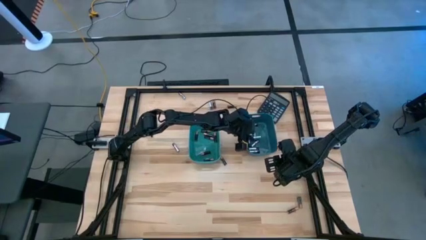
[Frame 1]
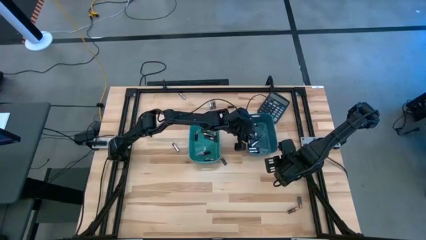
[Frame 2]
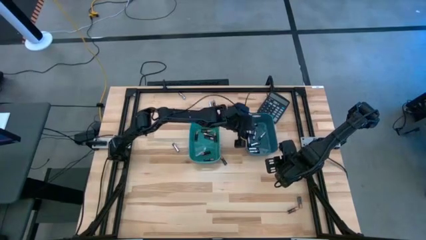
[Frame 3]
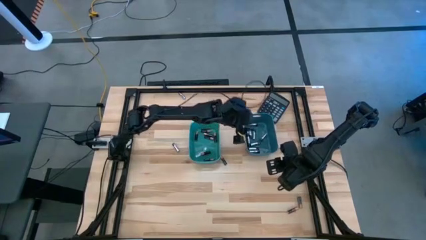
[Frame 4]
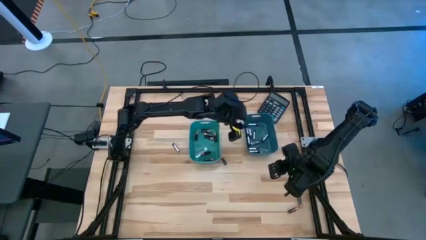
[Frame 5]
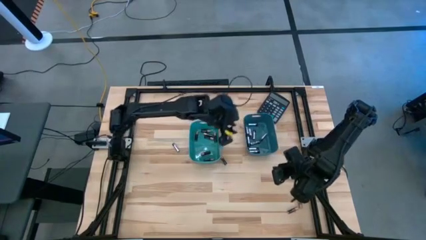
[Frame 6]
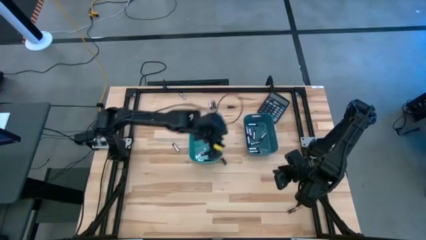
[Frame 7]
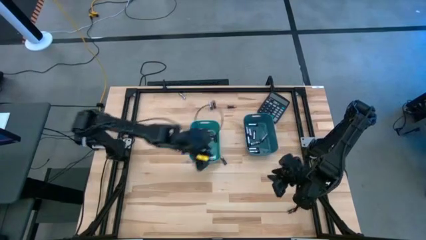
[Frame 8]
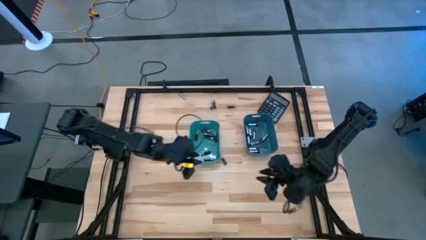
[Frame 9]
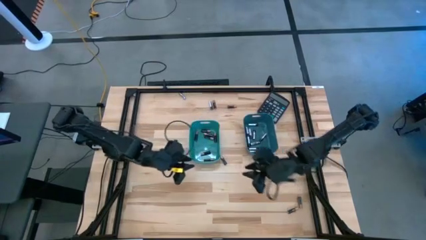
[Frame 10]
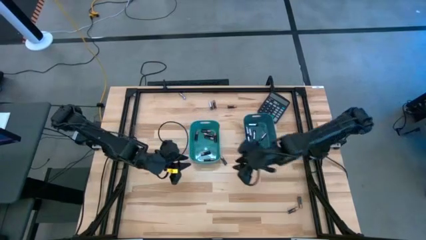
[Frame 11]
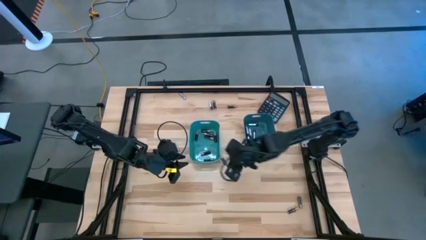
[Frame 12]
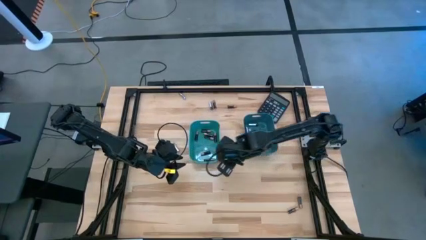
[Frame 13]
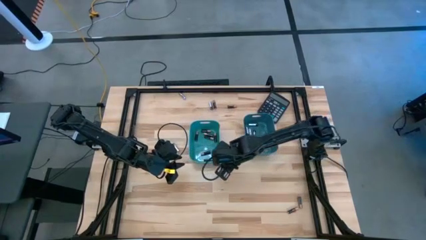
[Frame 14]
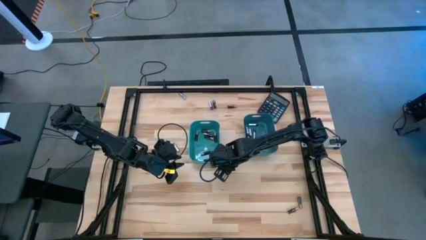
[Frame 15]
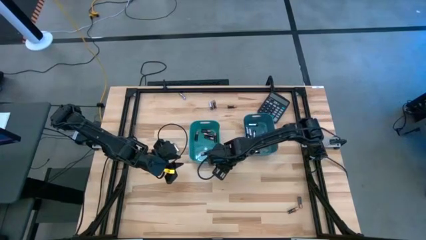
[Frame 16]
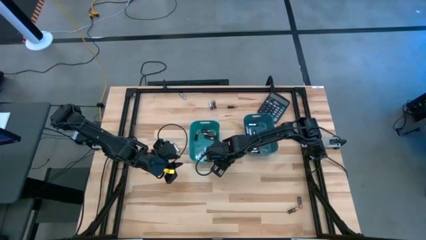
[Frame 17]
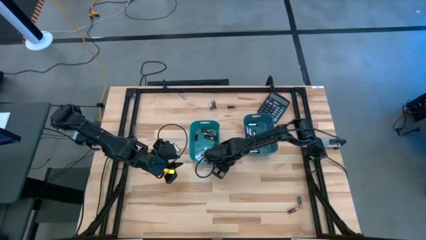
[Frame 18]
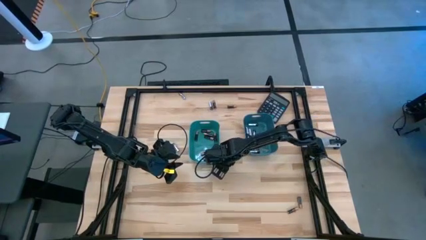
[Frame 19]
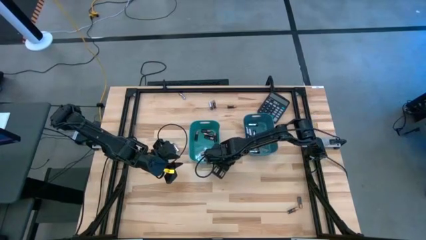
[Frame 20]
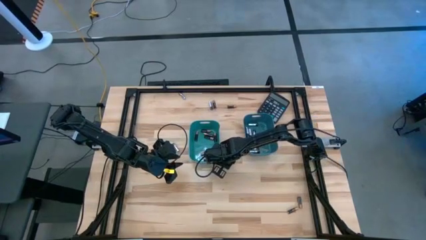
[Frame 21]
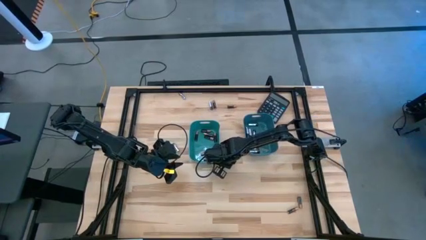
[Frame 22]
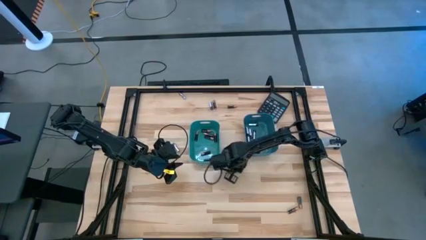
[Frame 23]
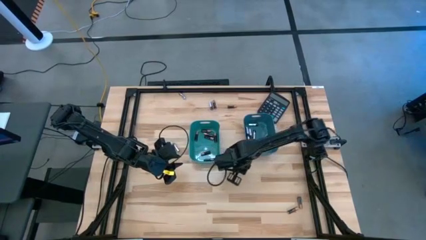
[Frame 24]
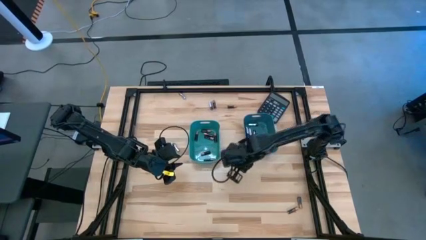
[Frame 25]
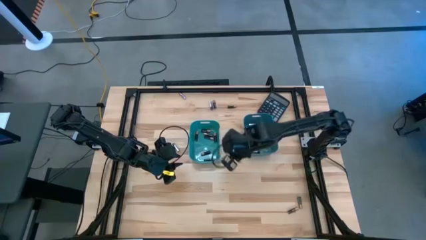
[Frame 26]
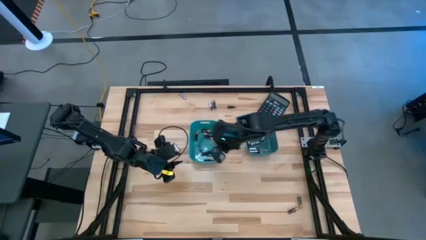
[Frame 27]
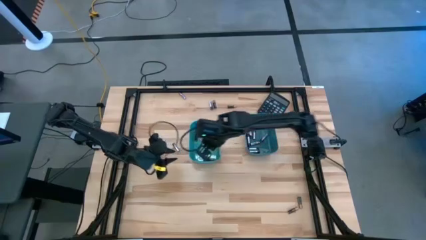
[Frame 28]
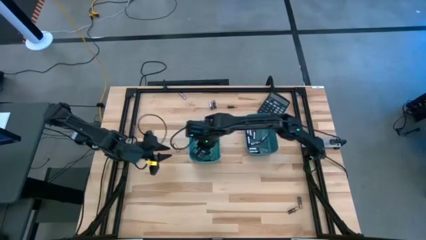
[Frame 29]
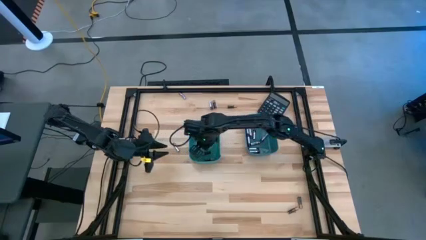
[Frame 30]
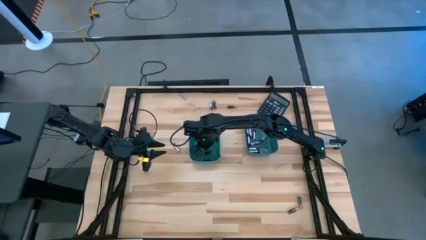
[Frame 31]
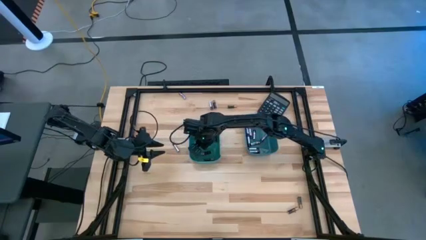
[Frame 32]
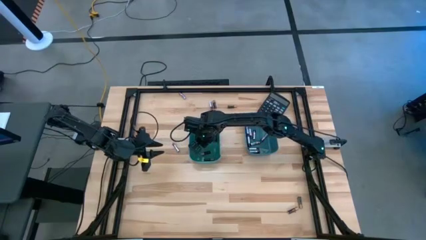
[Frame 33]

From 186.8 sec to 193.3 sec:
Task: Sort batteries
Put the black battery into the green bin

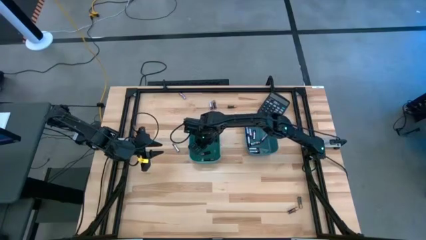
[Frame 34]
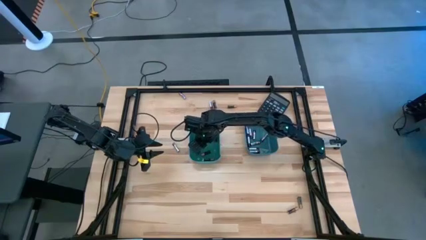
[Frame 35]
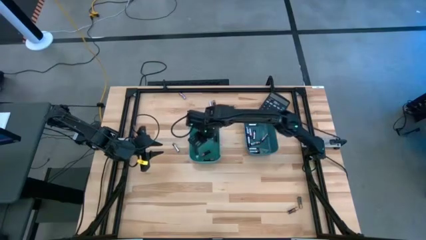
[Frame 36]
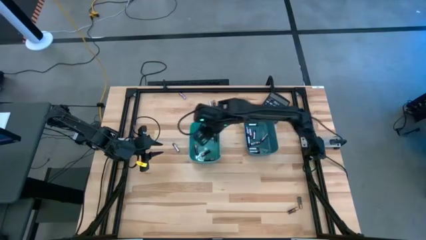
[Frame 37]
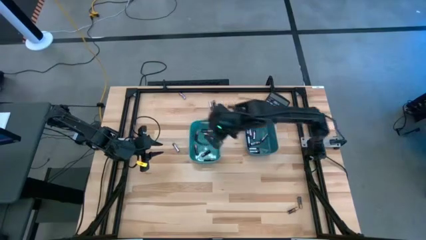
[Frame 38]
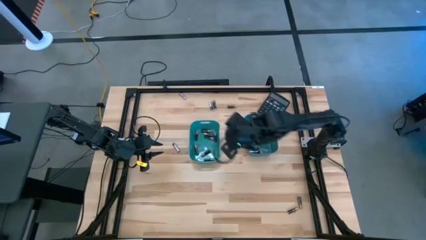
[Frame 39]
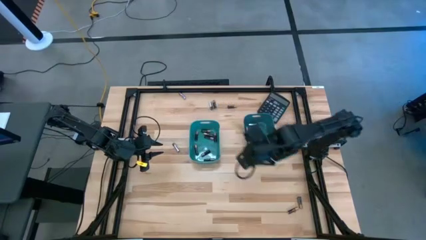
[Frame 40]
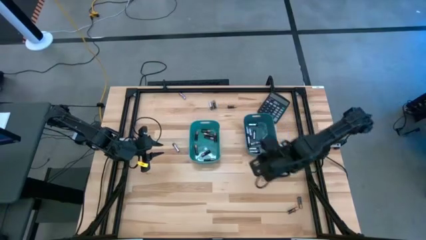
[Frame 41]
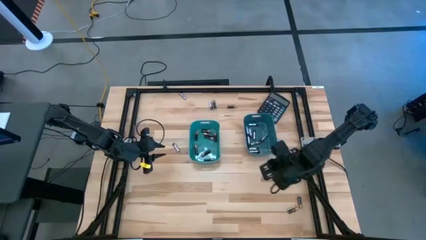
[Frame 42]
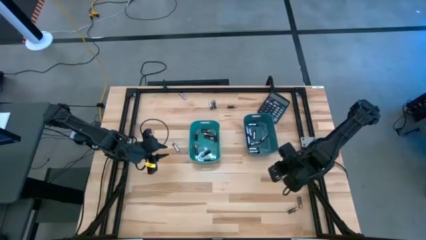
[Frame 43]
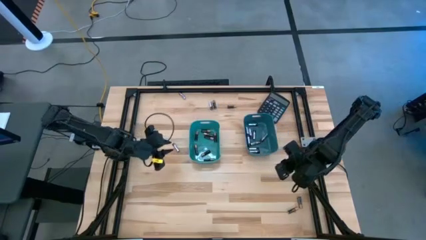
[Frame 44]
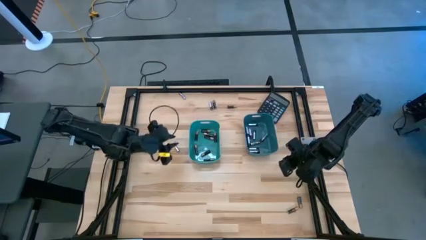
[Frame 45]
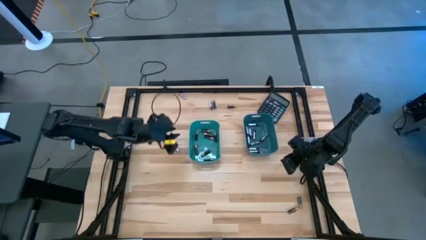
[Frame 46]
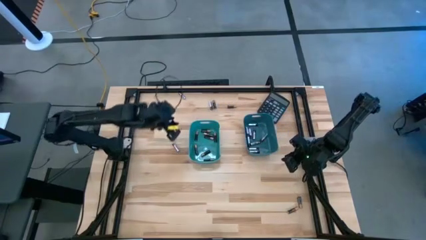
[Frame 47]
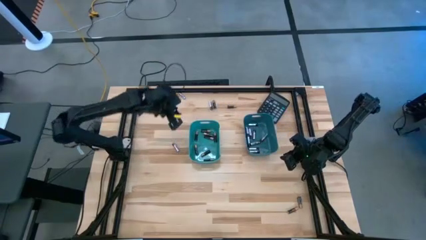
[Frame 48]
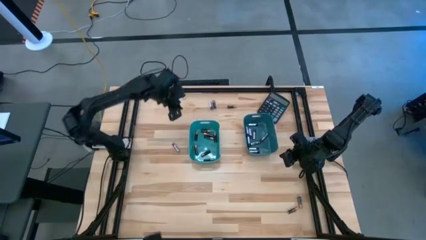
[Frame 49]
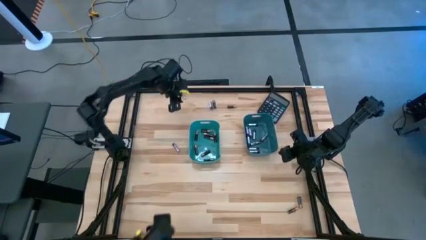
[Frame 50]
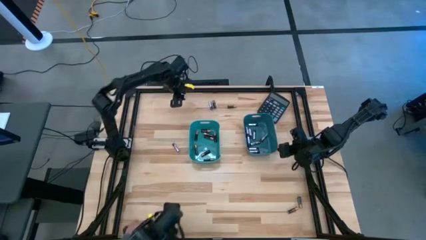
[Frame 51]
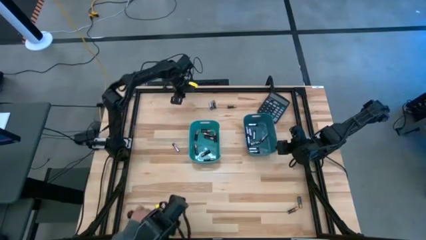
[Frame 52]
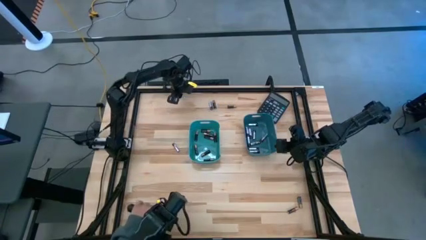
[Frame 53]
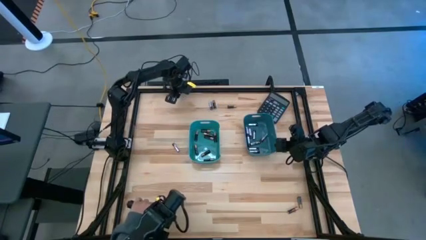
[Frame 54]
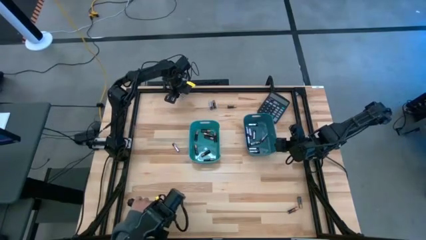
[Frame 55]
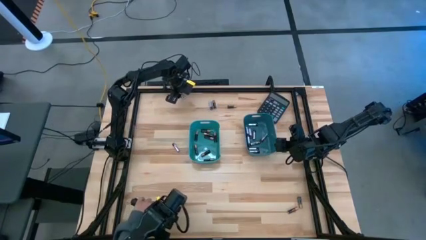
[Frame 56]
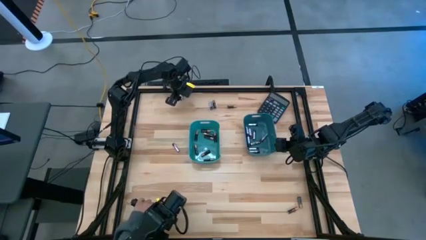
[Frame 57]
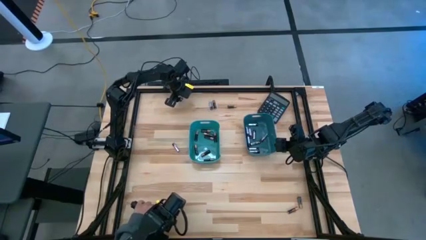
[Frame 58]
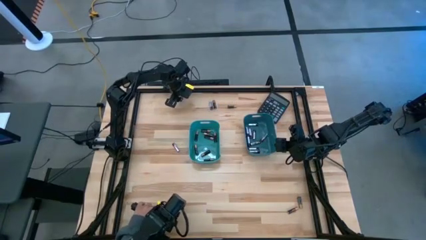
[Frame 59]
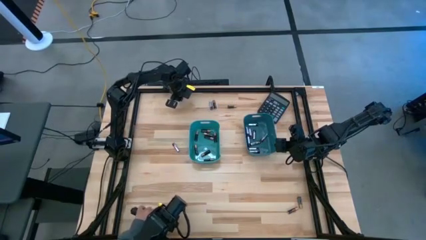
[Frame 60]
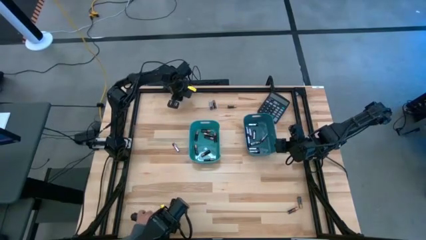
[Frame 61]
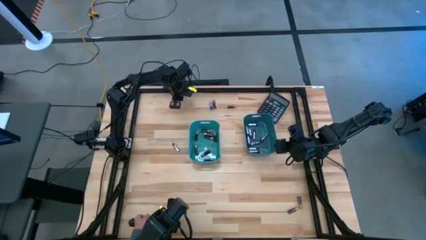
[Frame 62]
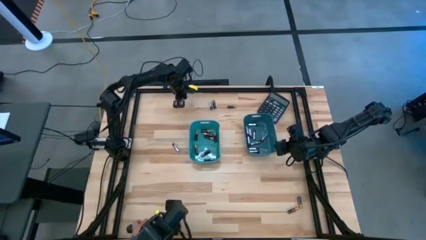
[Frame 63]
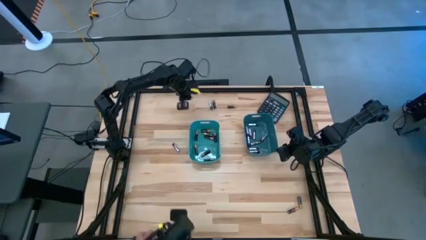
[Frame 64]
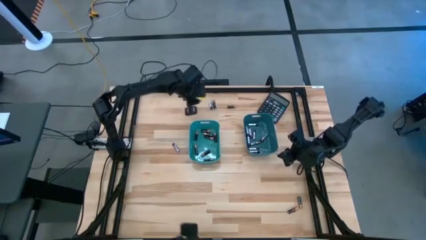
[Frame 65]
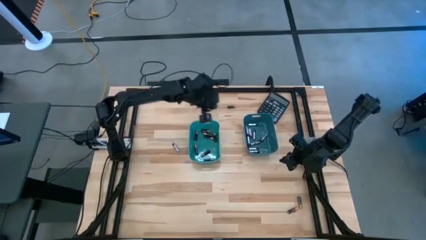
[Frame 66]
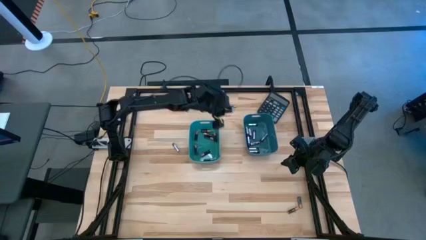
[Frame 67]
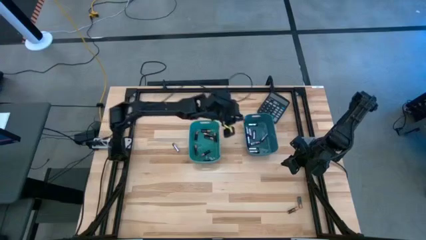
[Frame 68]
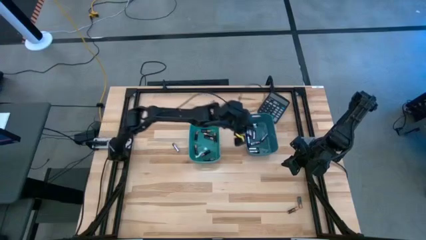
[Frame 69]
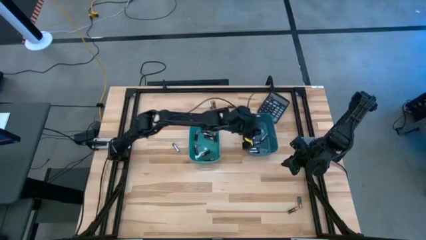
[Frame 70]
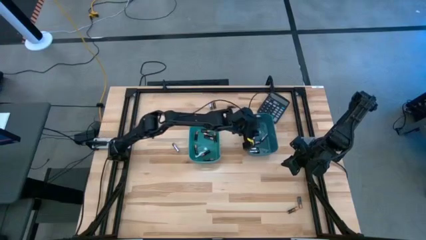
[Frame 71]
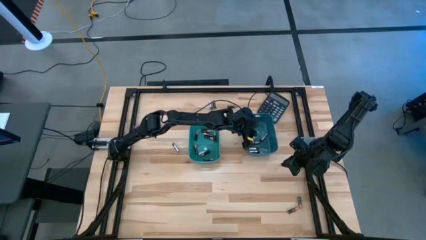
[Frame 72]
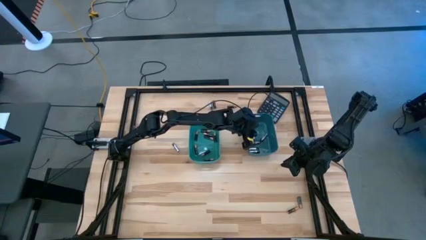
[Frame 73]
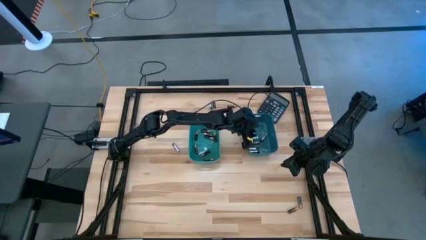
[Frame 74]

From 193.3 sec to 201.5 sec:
Put the silver battery into the blue bin
